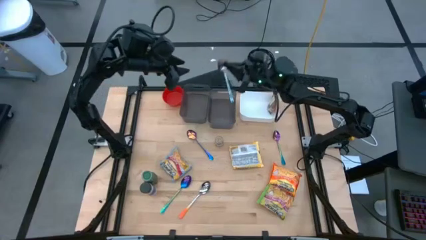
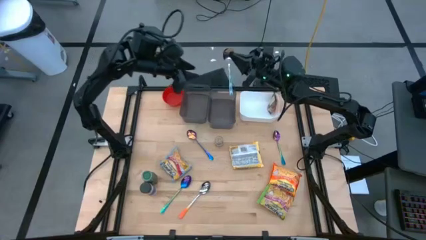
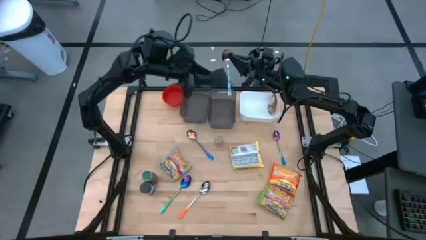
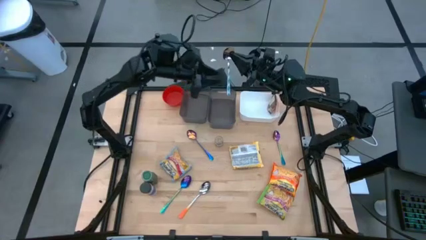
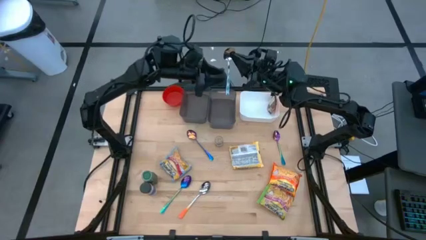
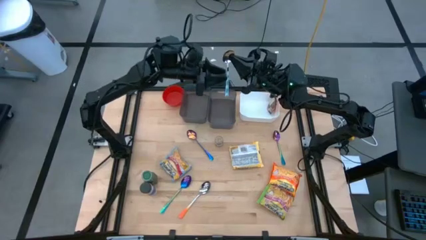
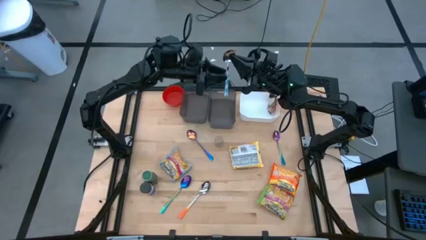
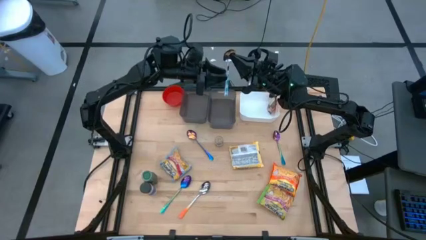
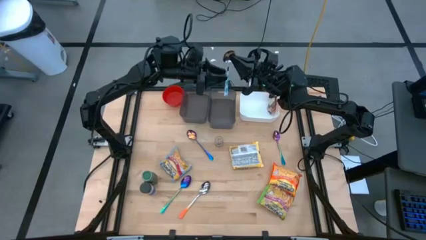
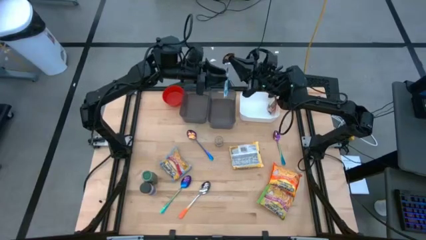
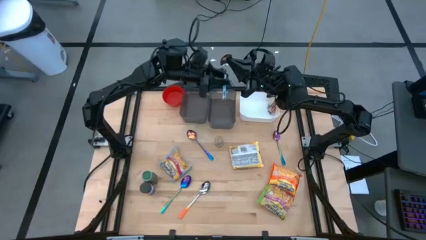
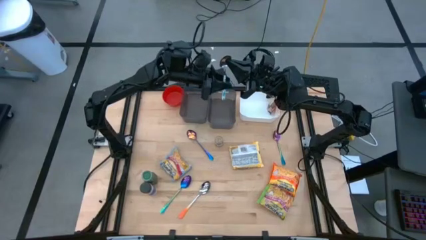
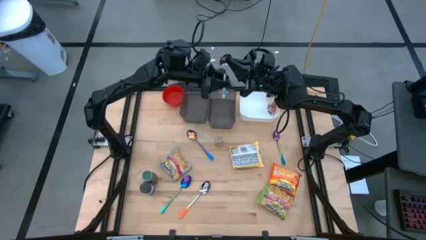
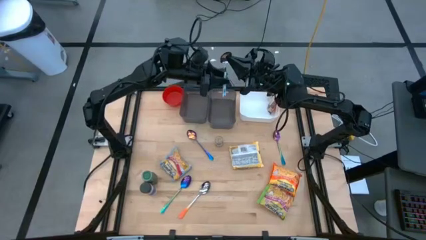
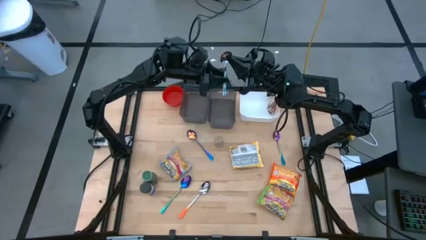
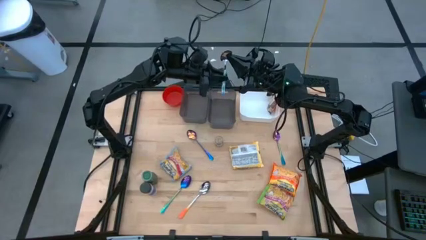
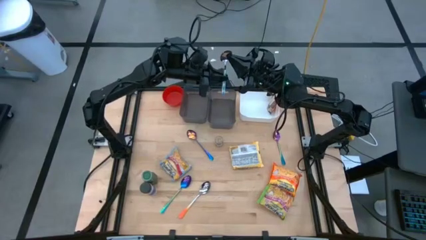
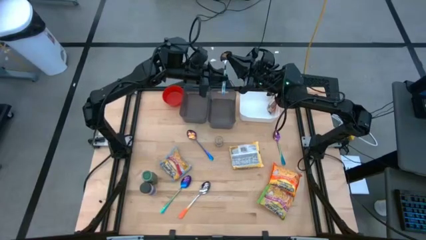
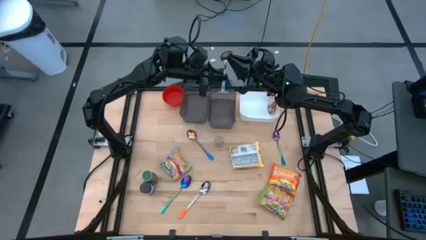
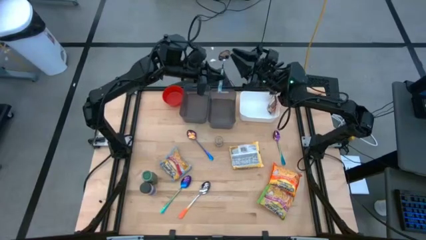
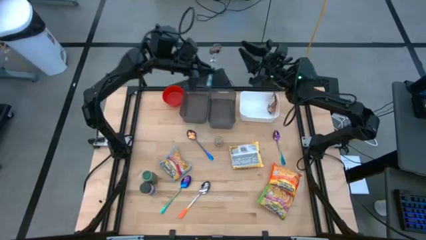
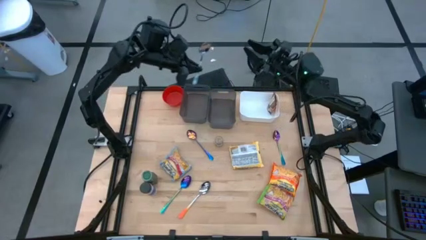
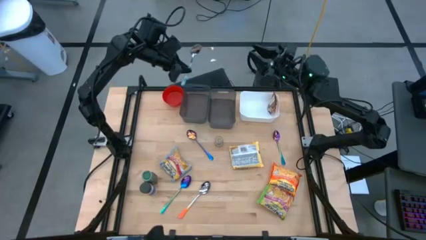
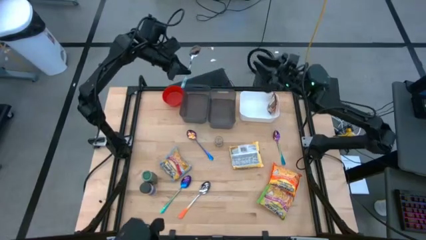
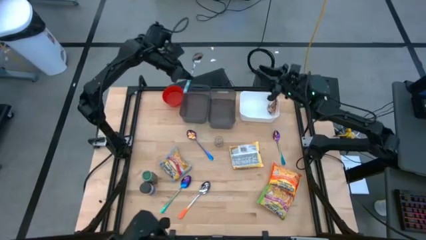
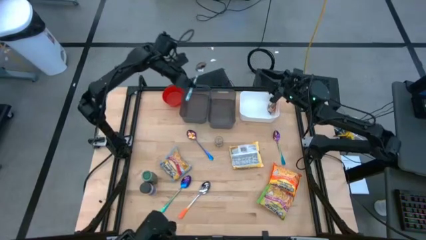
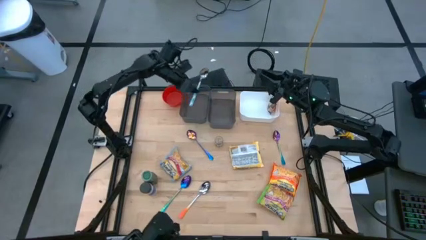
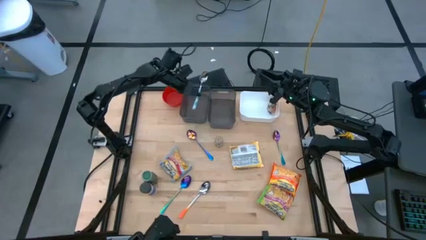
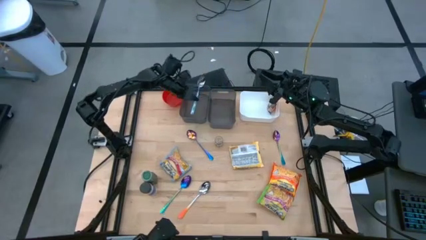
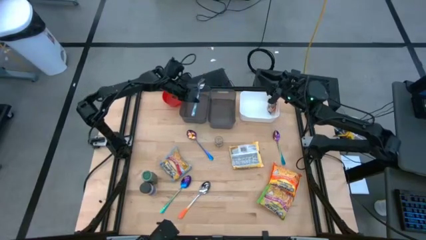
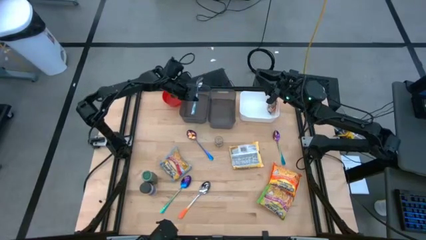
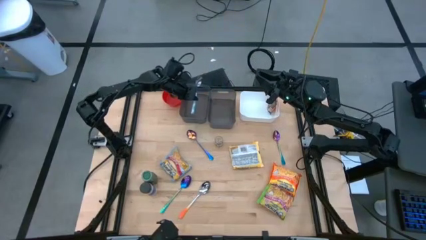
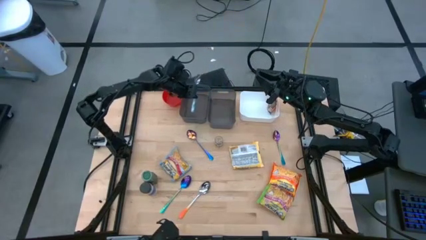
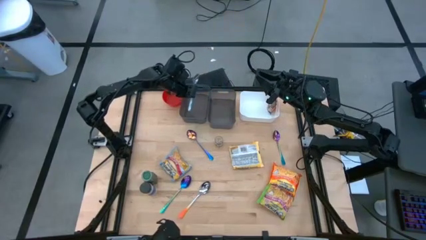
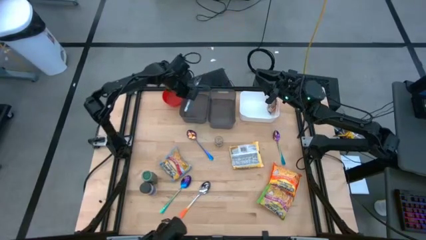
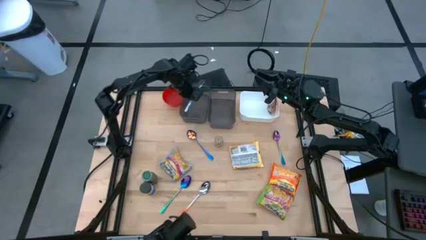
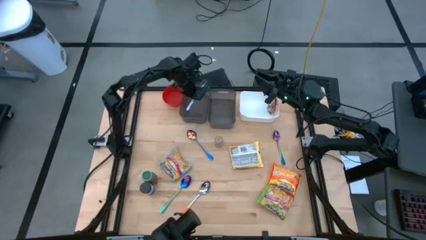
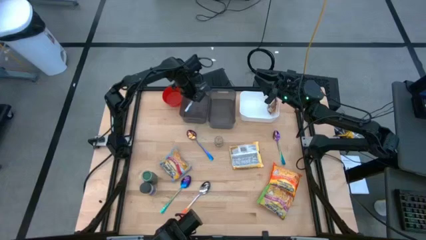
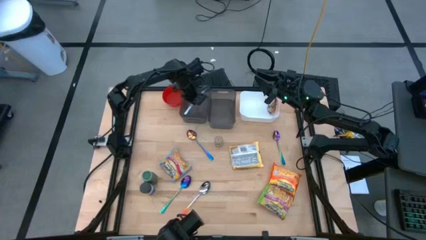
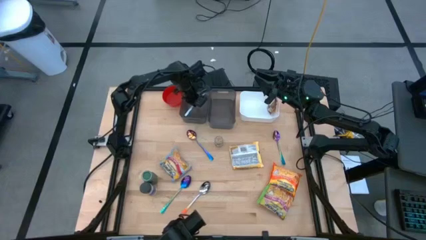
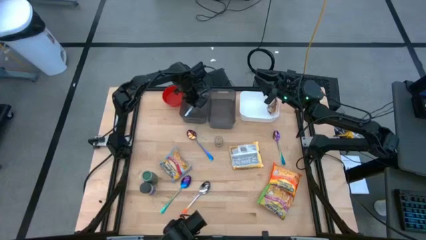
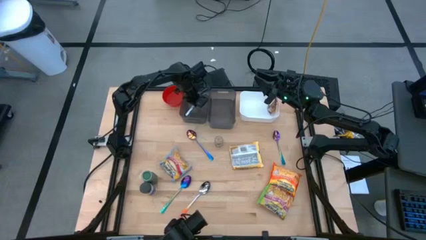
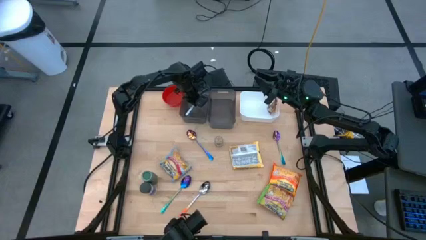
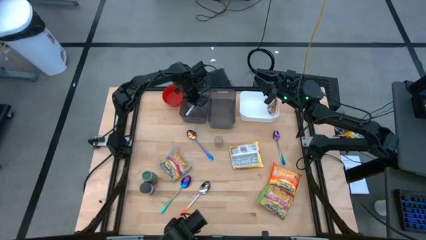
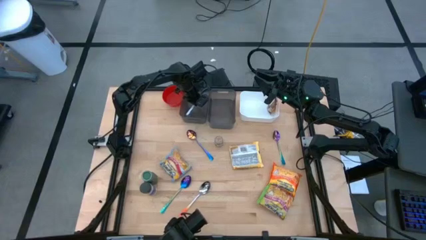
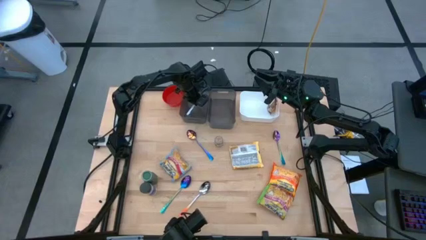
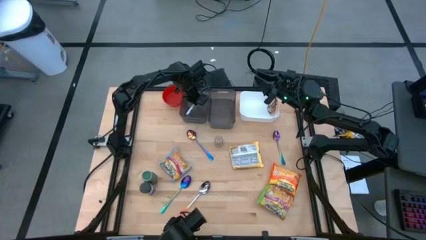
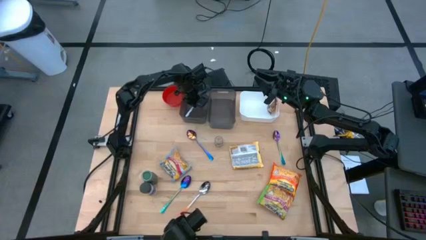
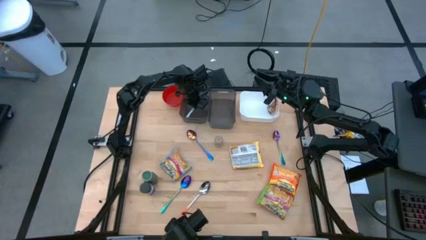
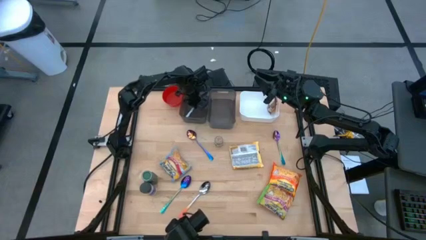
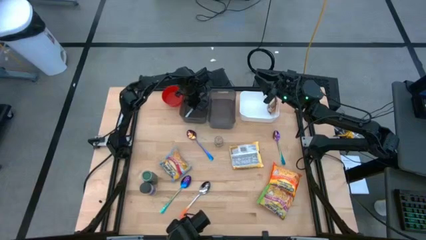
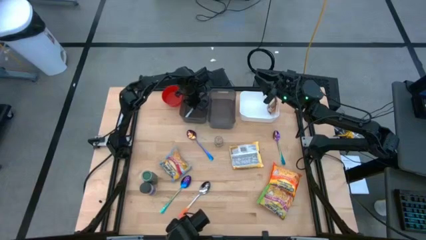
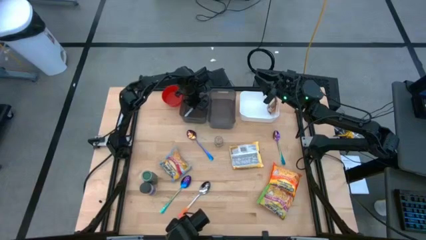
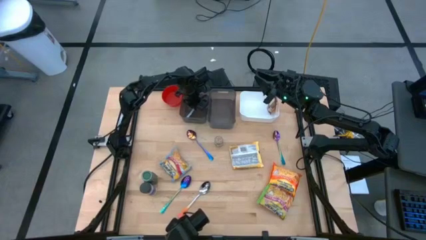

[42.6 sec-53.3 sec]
Task: Pick & Place Food Item
Put the white and blue spoon into the left black bin
